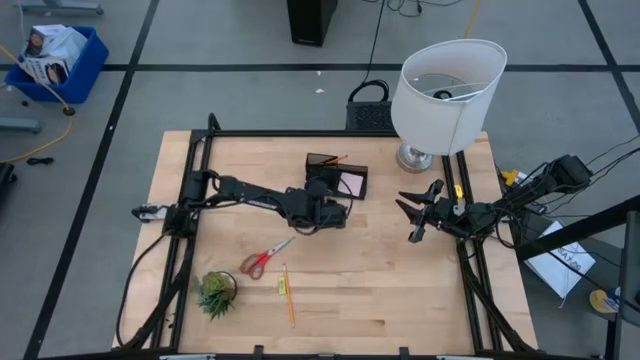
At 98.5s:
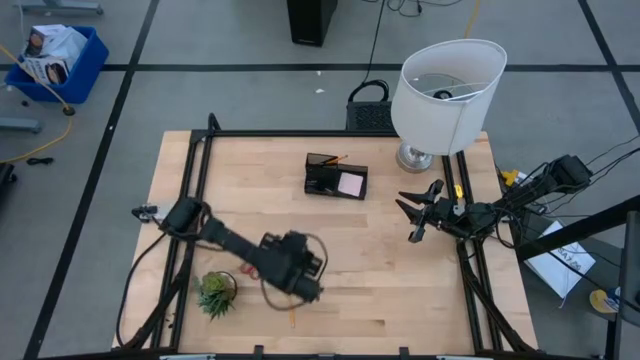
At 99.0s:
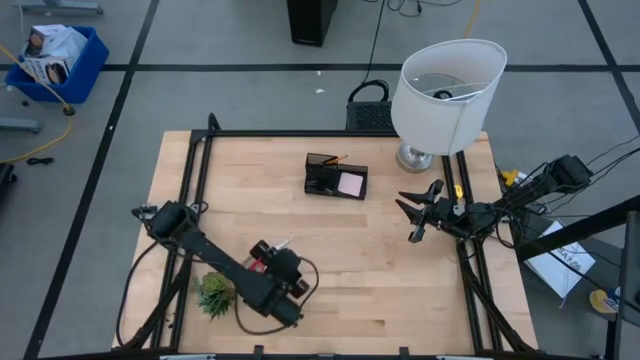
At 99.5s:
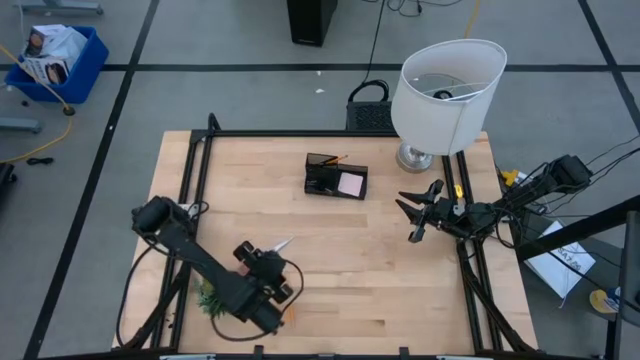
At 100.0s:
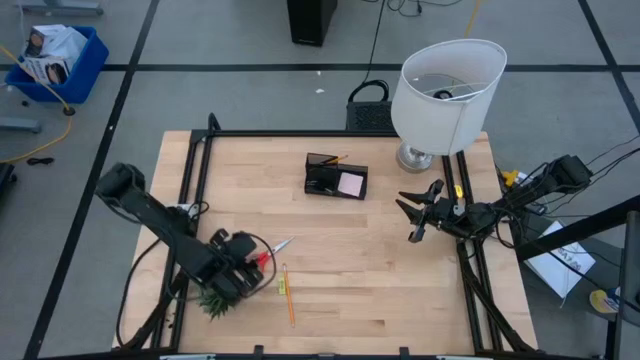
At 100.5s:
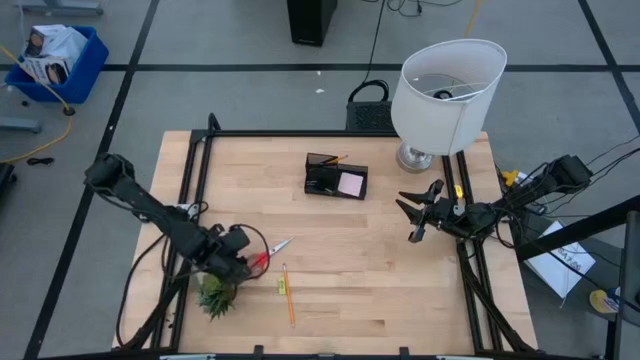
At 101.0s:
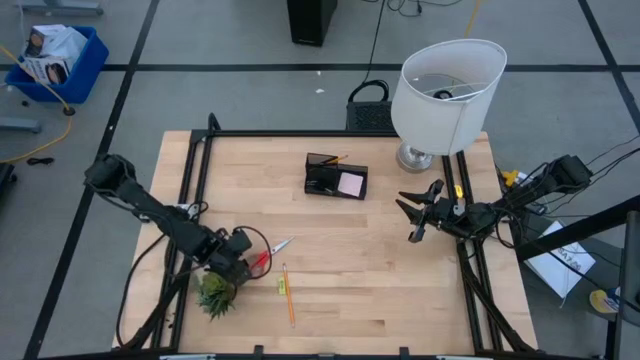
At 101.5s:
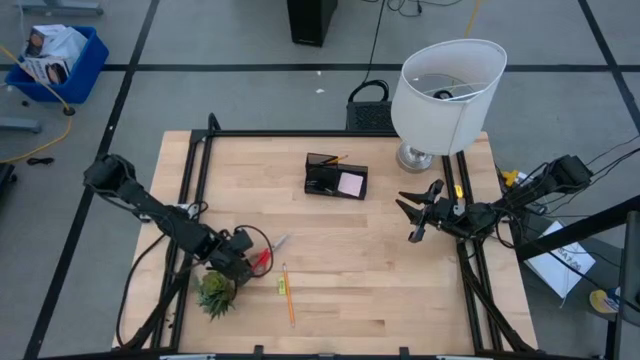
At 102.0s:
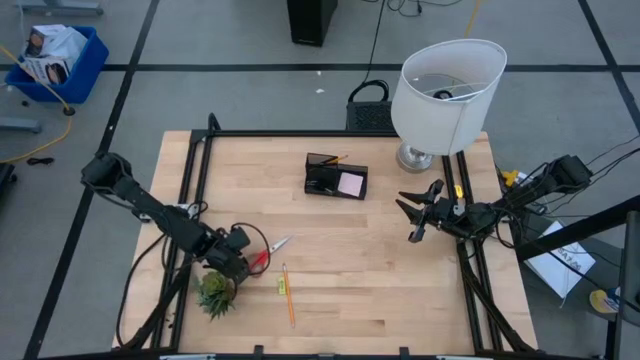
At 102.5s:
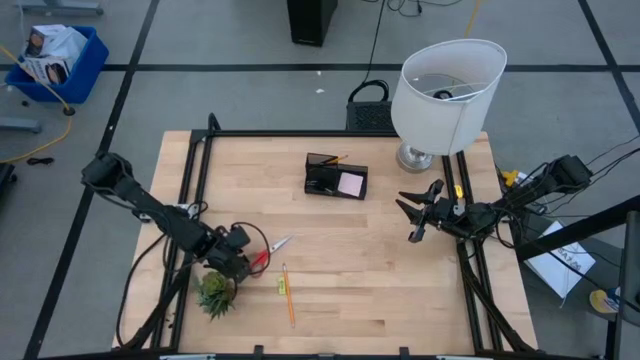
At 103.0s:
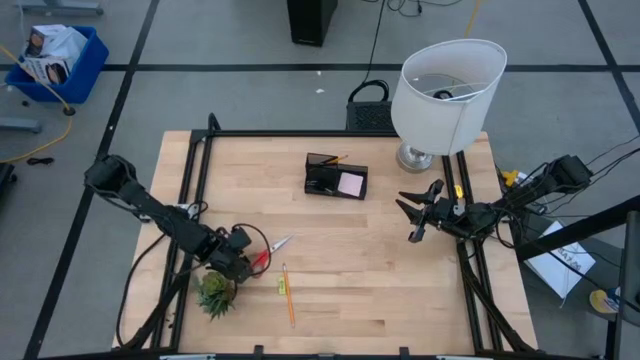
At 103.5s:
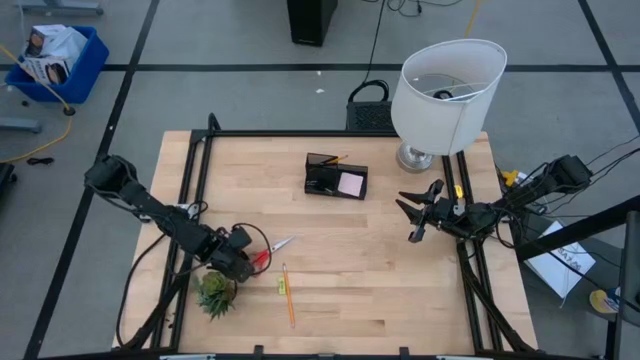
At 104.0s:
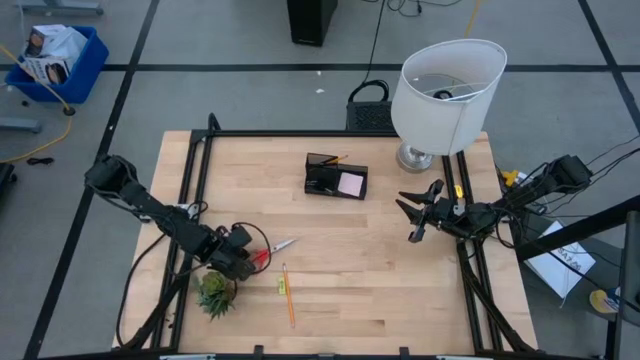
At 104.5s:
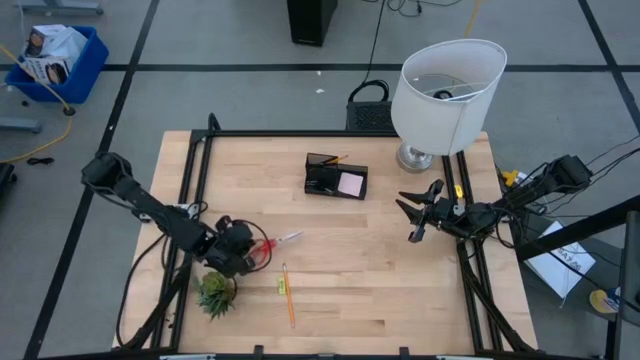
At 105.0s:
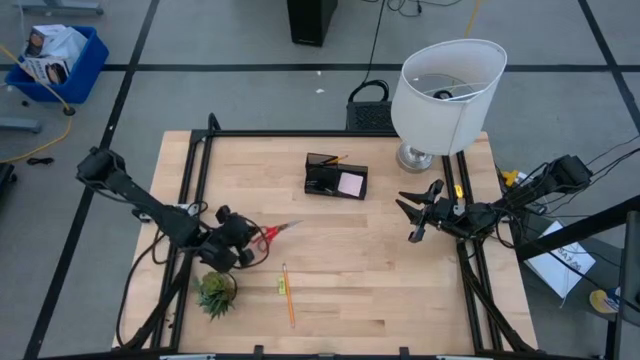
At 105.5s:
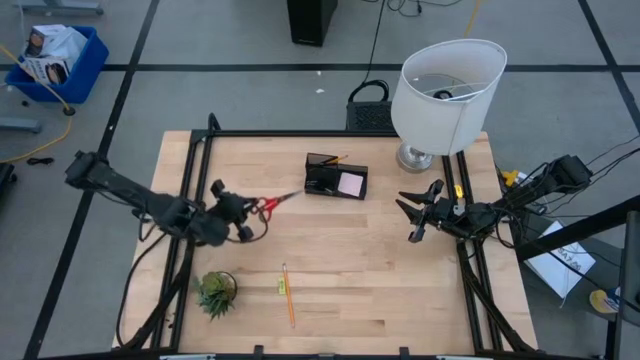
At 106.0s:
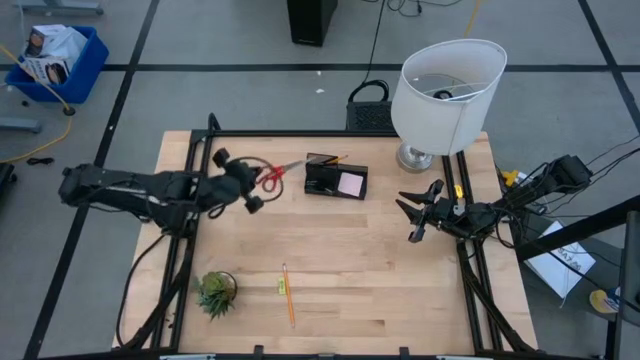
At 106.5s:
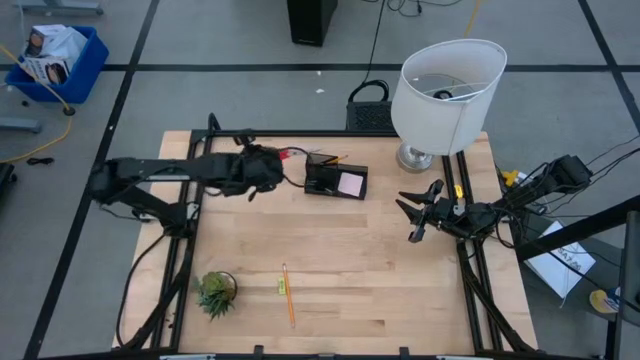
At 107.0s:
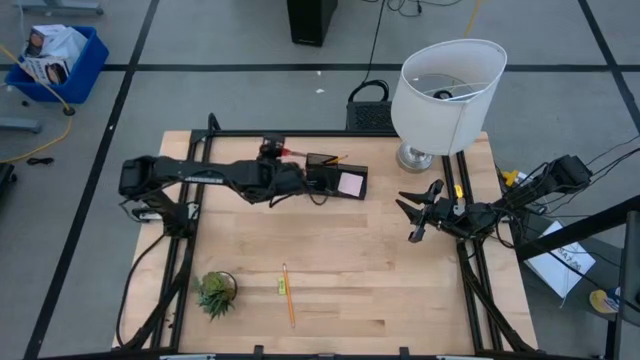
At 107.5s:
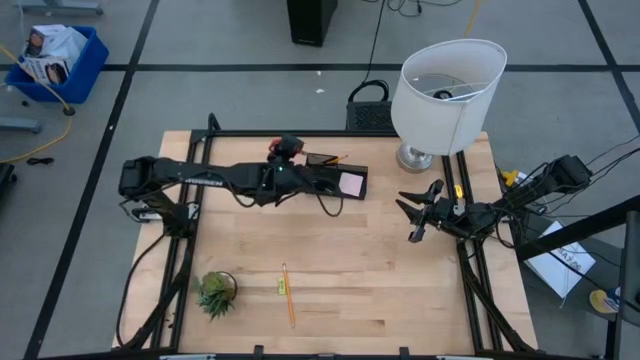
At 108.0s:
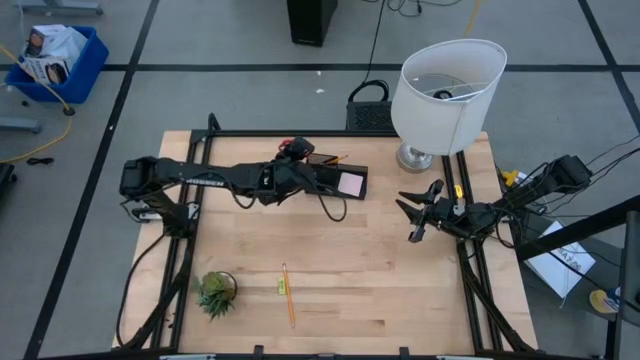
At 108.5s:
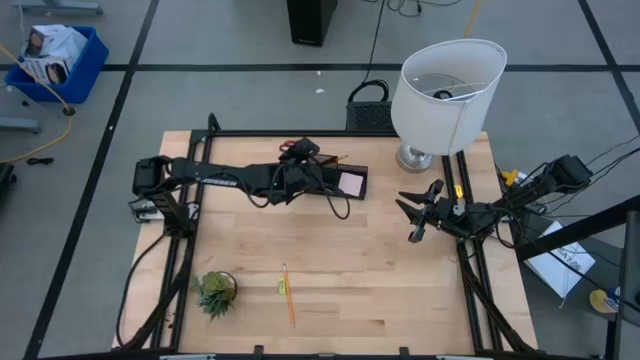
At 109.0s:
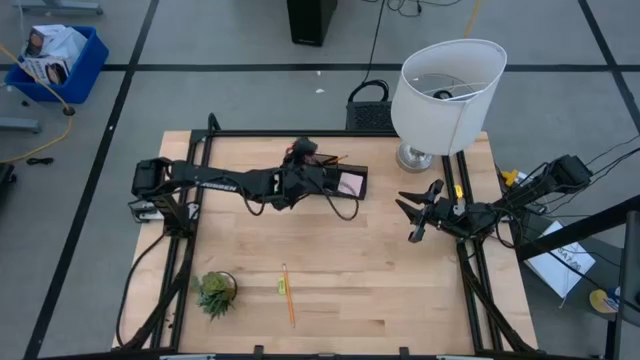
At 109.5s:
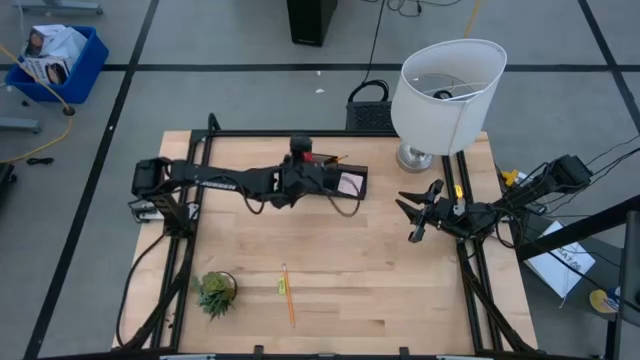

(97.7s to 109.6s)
Task: Pick and place office supplies into organizer
Put the red scissor into the desk organizer
